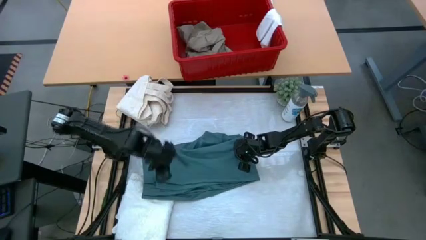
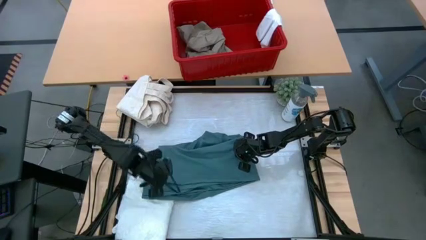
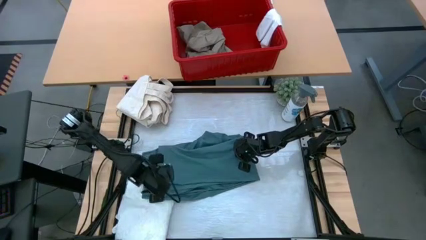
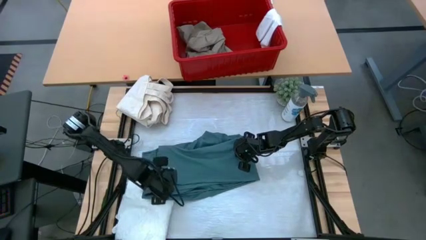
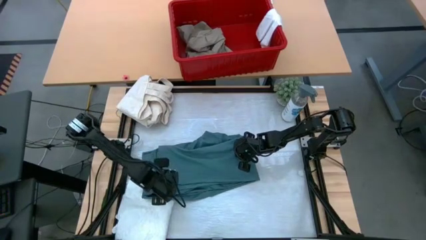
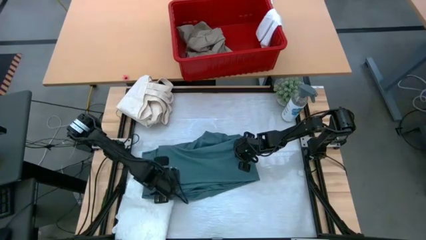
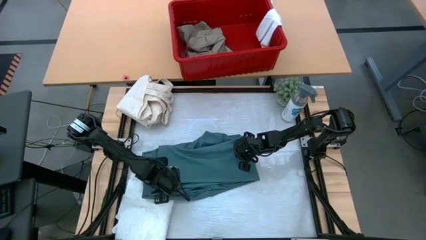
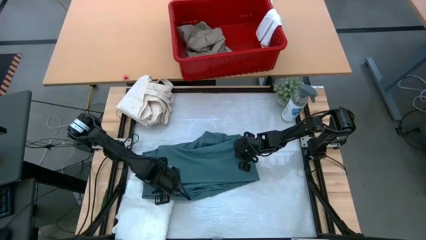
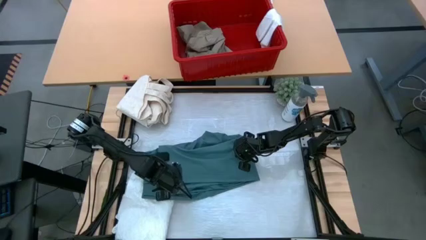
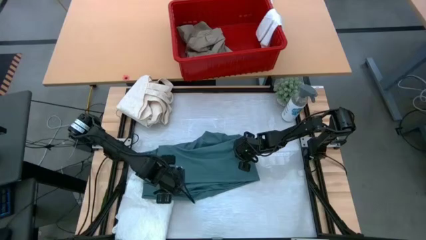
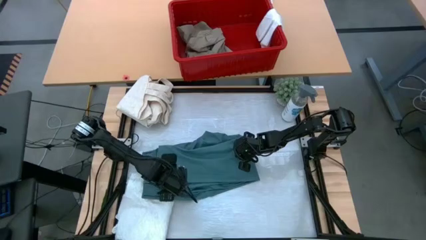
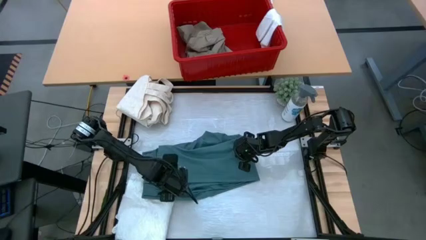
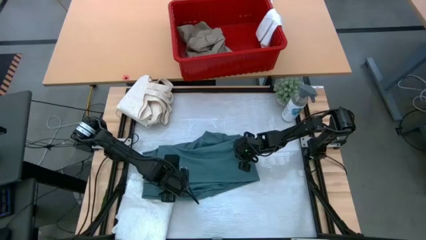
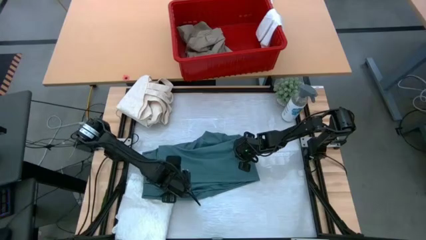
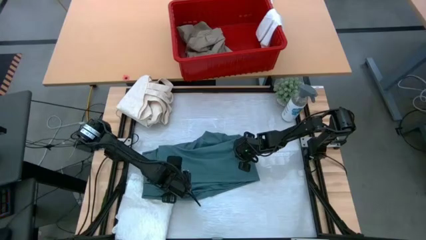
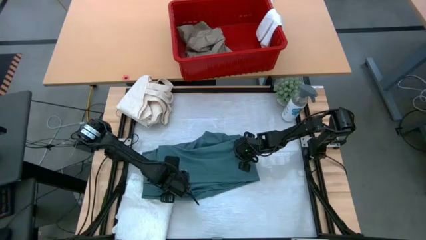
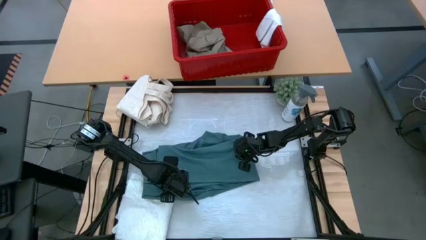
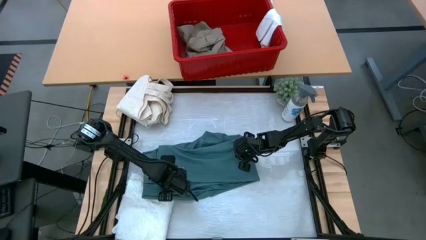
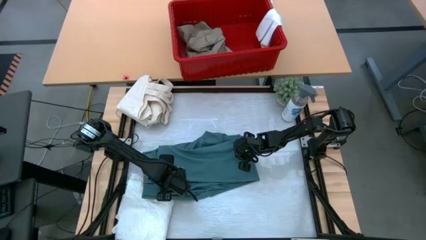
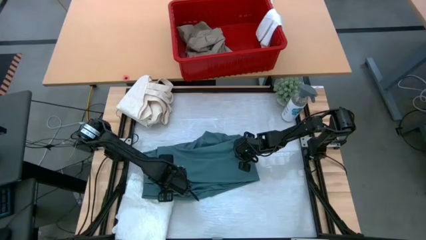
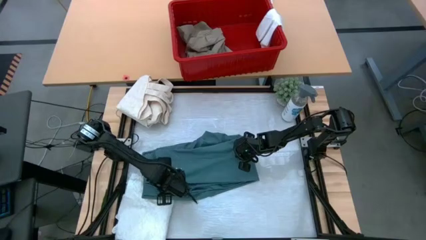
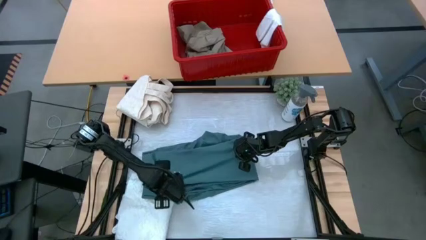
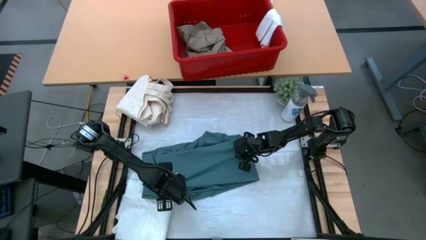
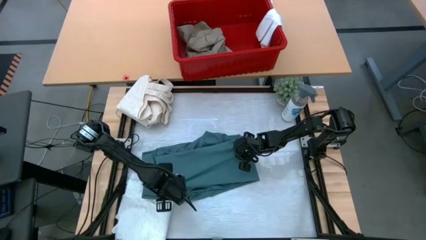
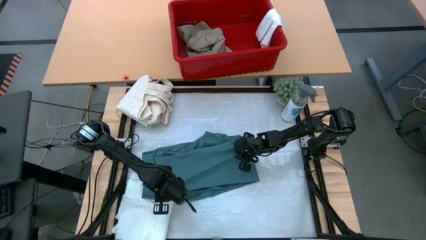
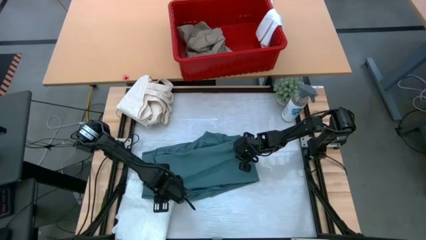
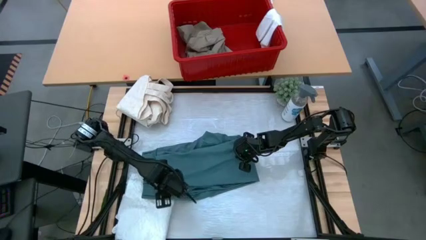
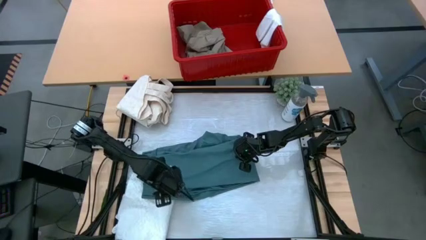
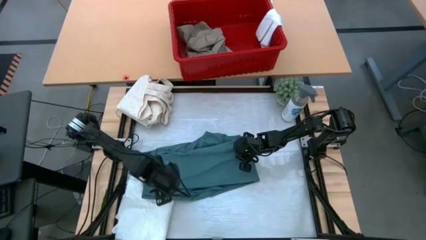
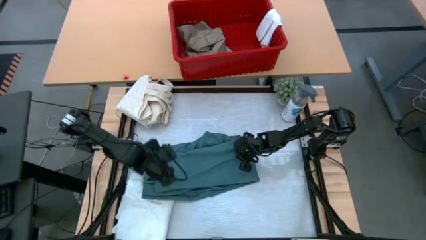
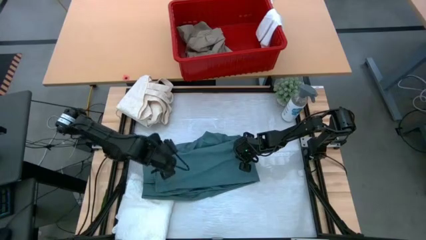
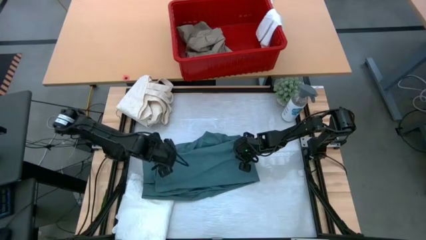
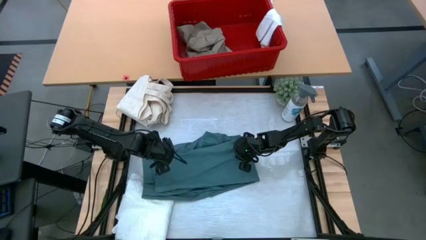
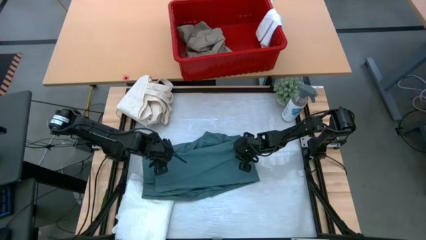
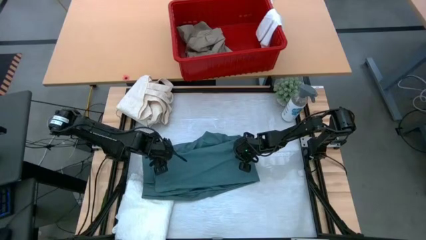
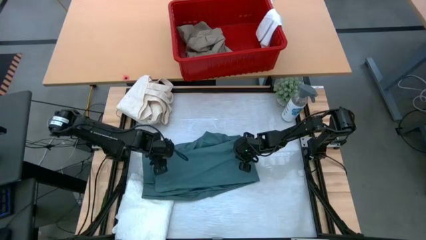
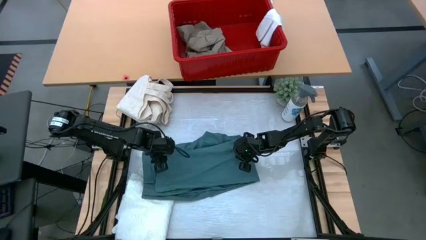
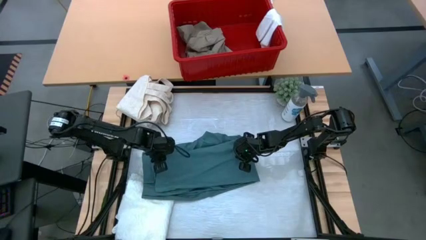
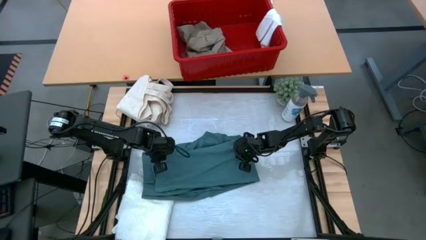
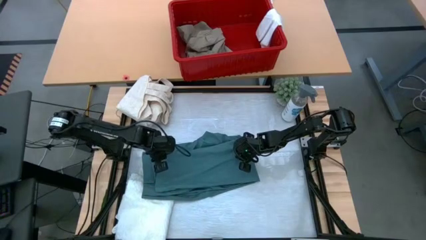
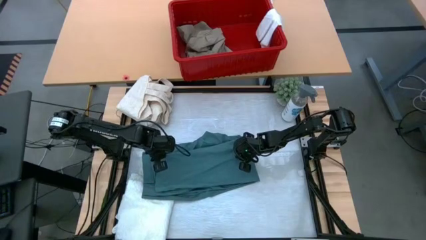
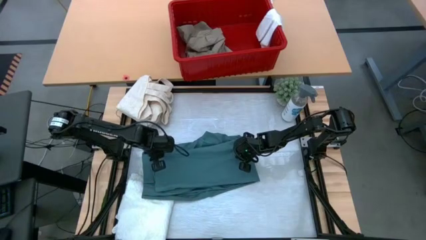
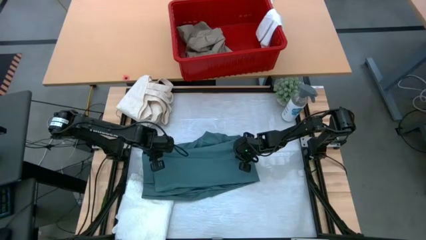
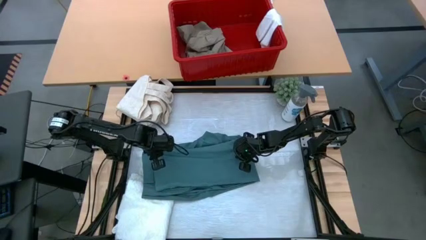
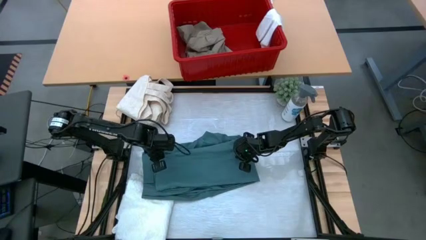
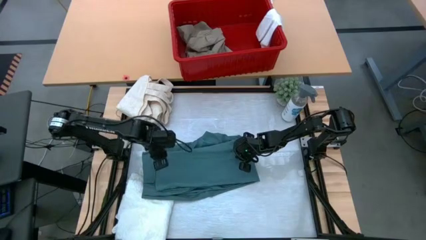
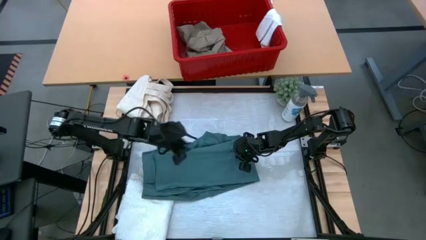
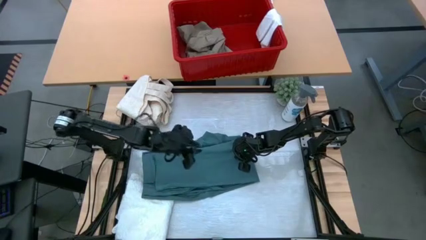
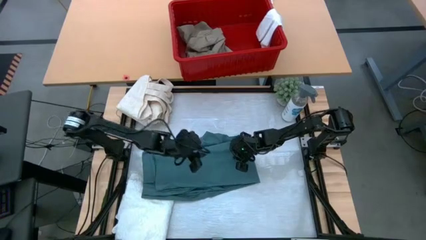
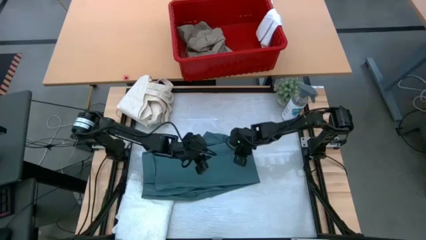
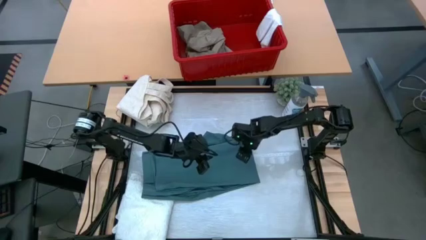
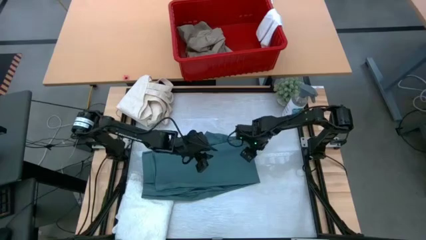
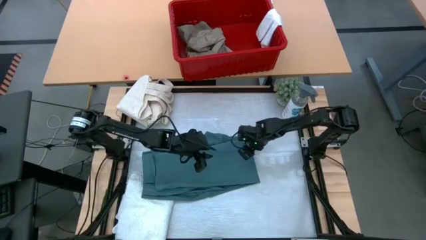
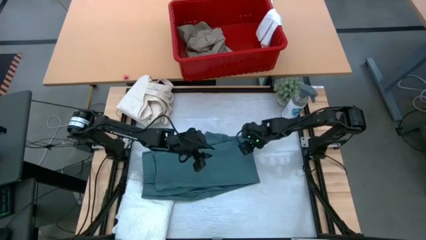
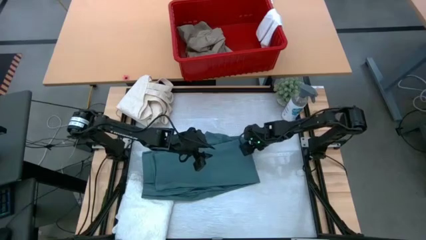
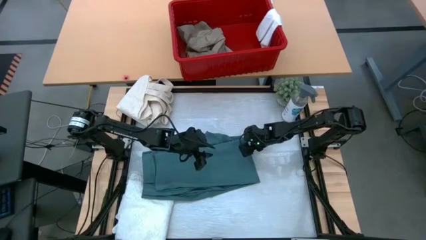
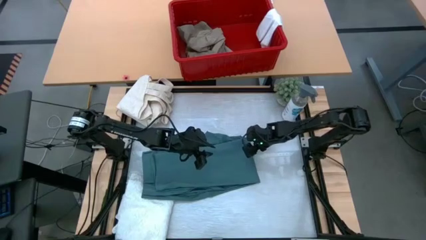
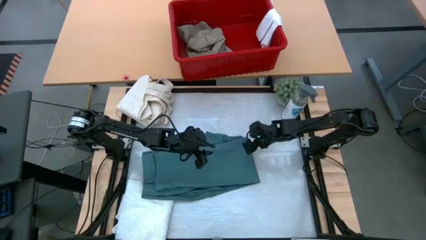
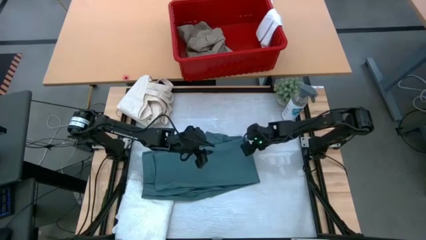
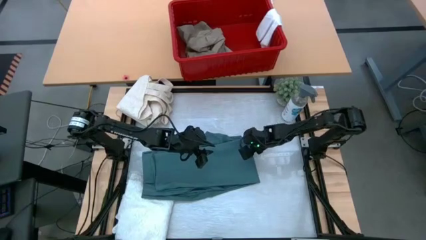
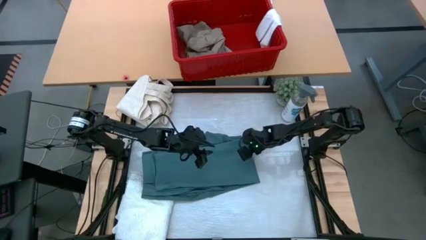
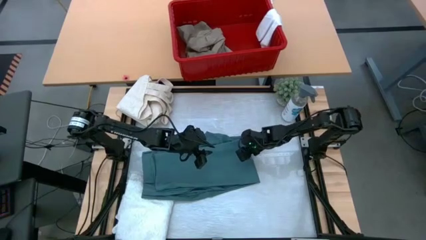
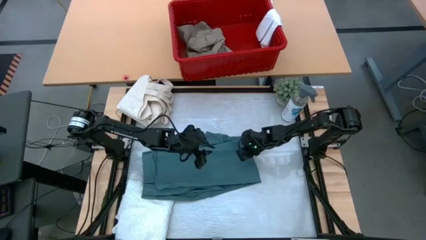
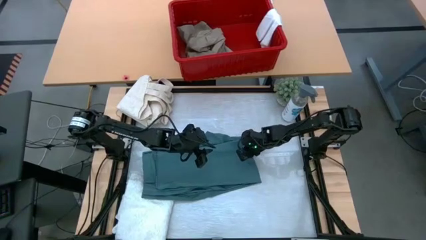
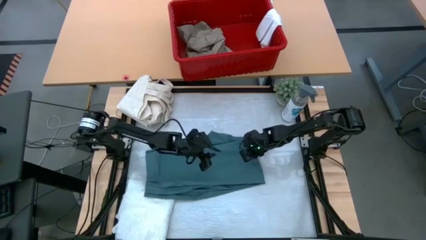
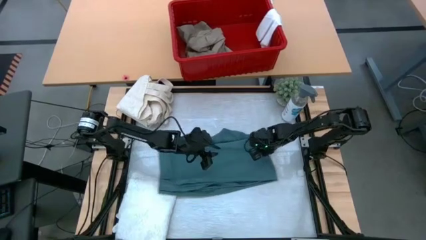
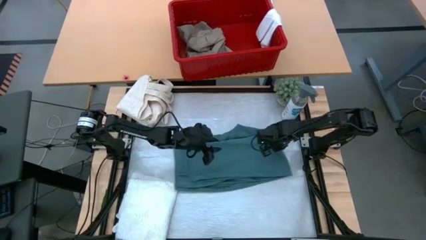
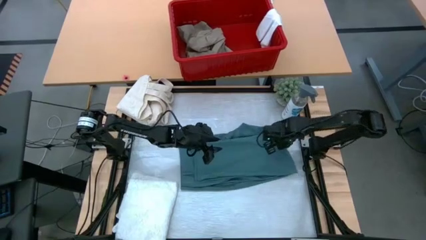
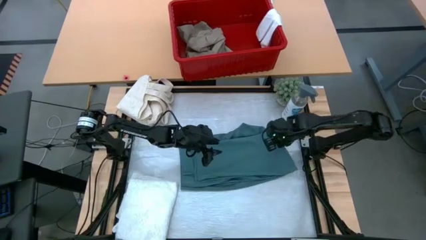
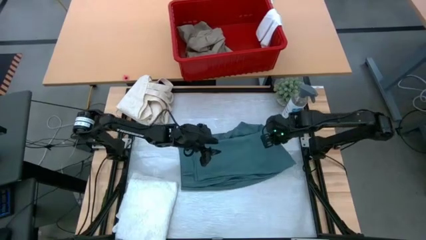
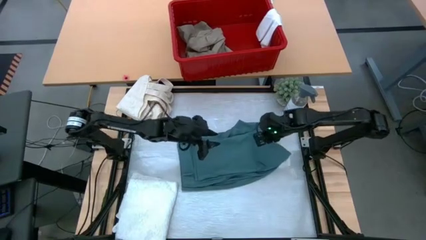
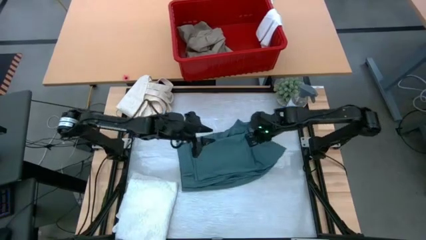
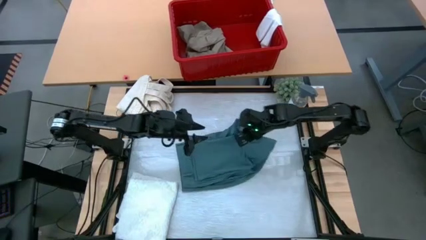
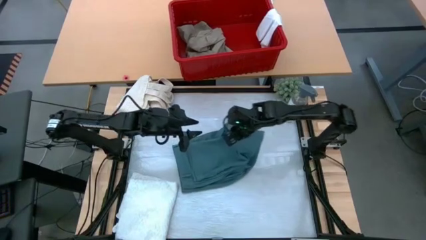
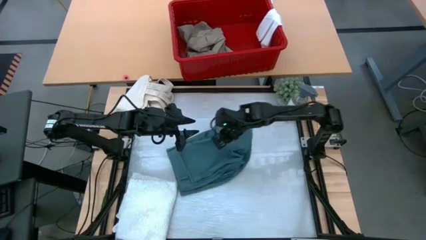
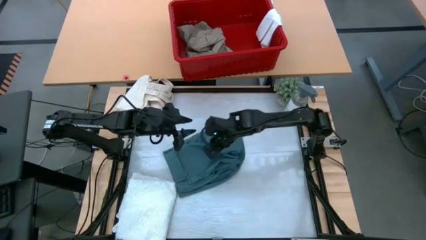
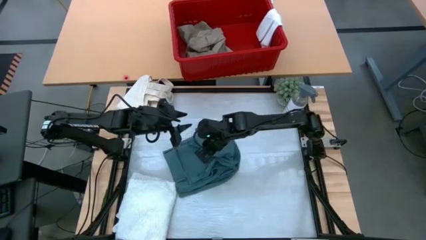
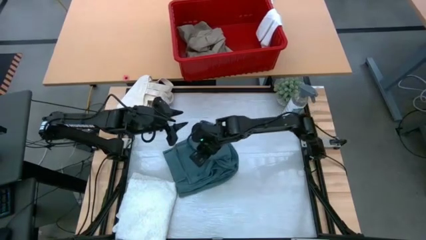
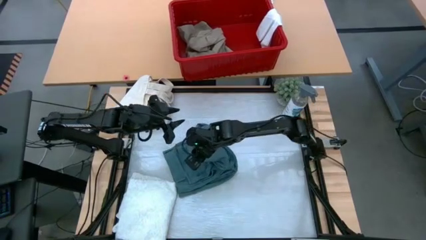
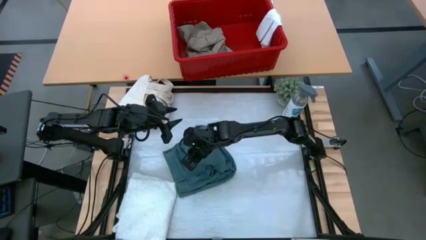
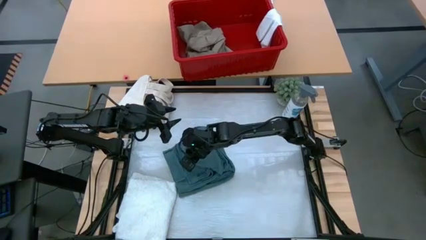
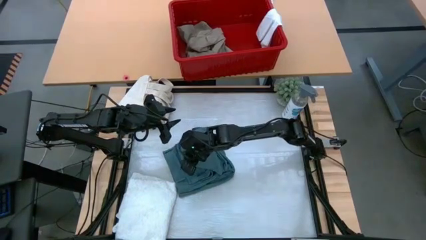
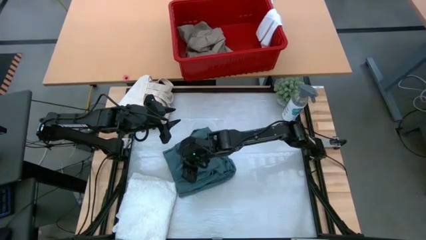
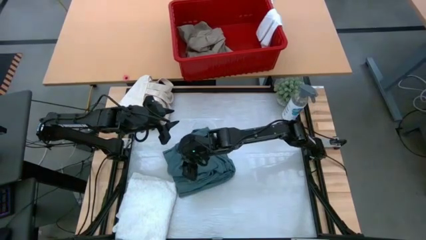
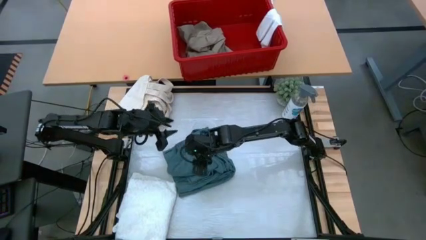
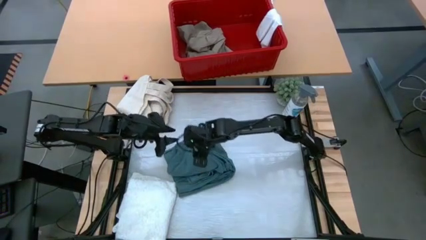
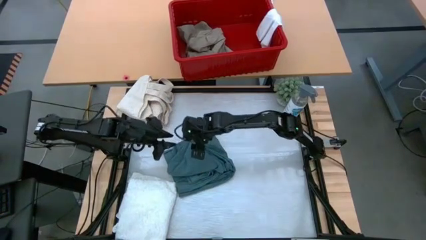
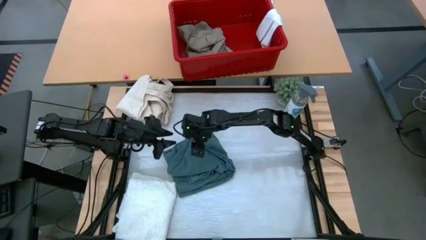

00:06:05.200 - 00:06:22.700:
Task: Fold Laundry from Bin
Fold the blue pants
